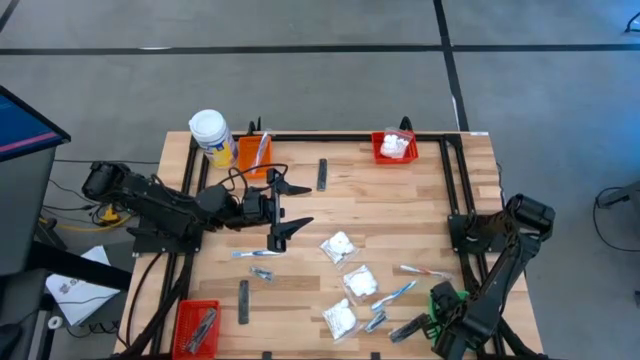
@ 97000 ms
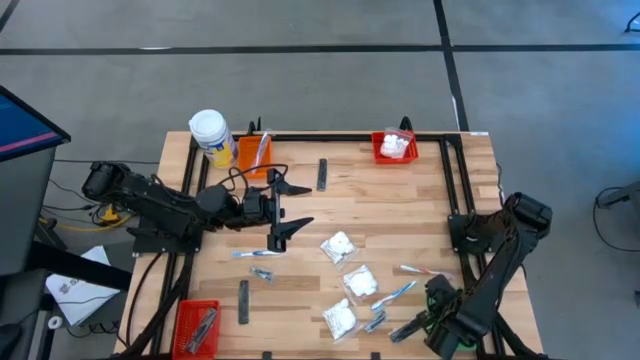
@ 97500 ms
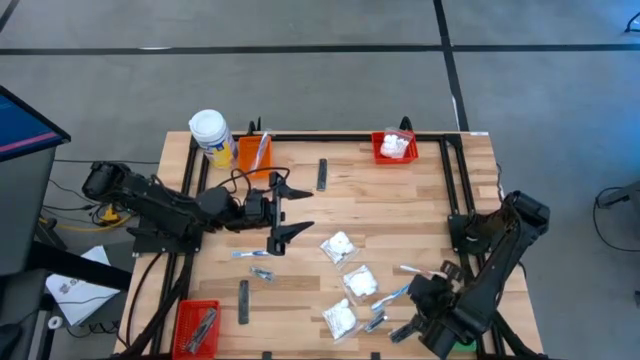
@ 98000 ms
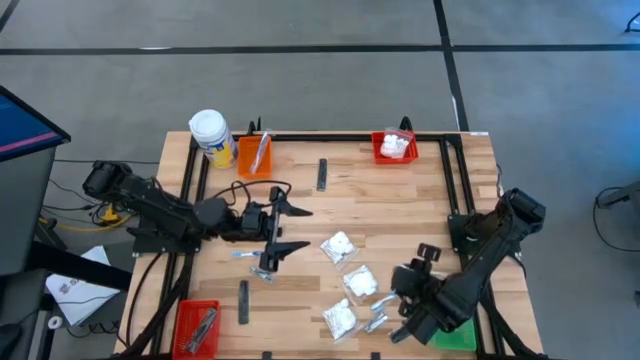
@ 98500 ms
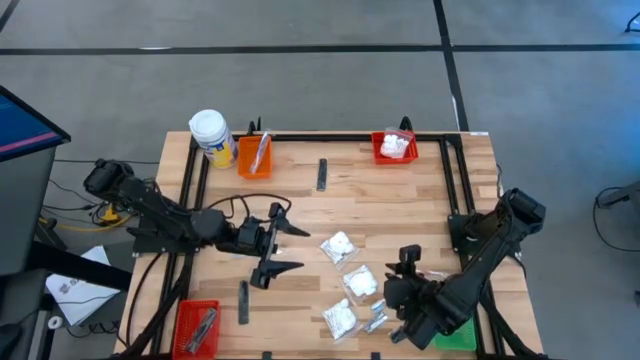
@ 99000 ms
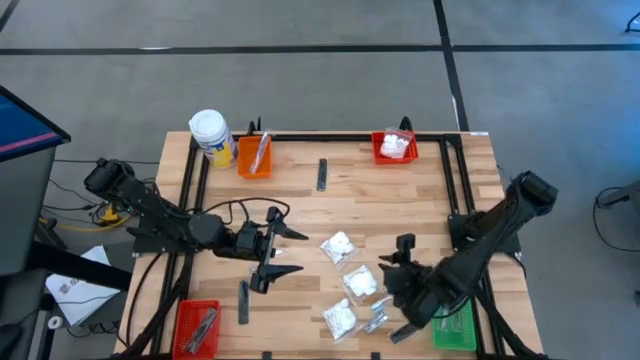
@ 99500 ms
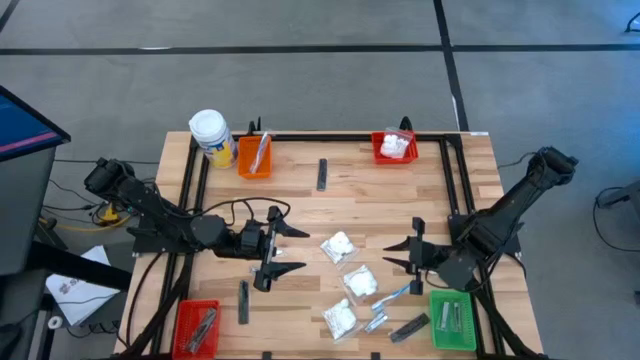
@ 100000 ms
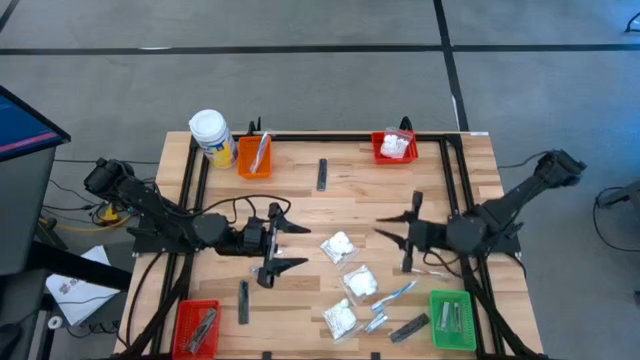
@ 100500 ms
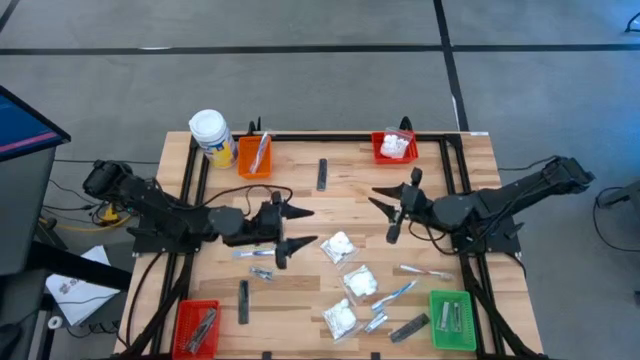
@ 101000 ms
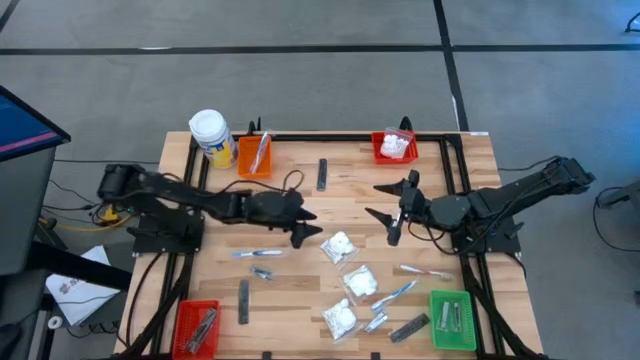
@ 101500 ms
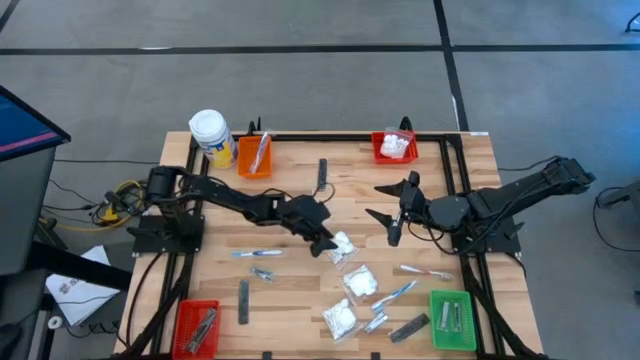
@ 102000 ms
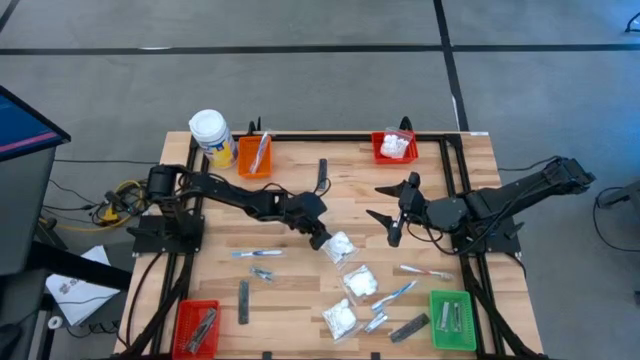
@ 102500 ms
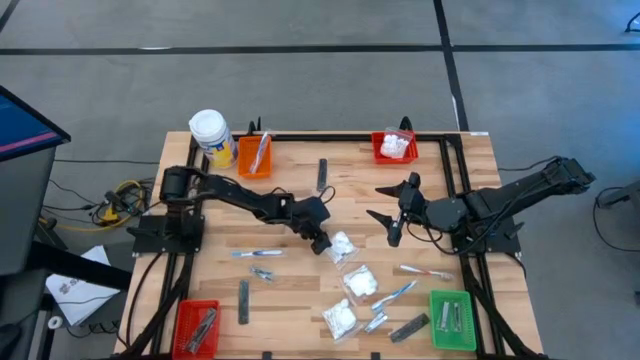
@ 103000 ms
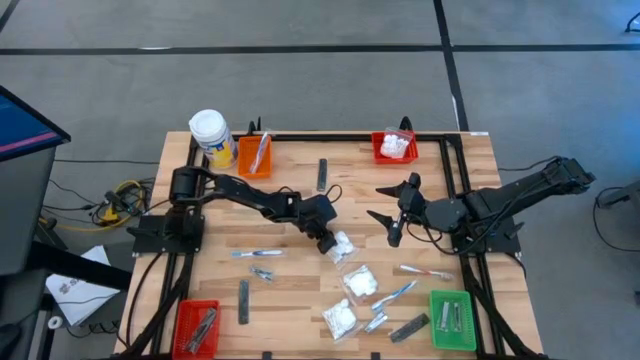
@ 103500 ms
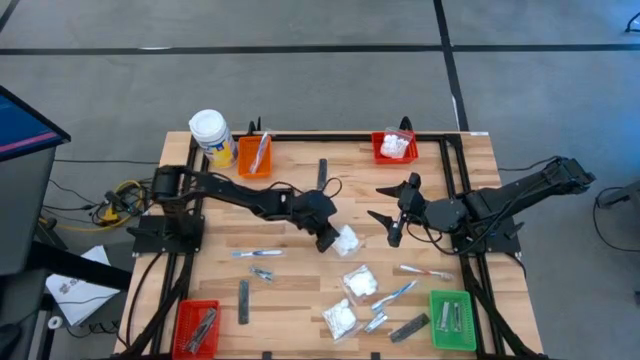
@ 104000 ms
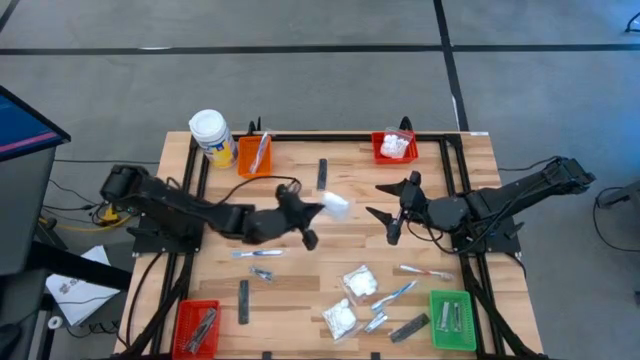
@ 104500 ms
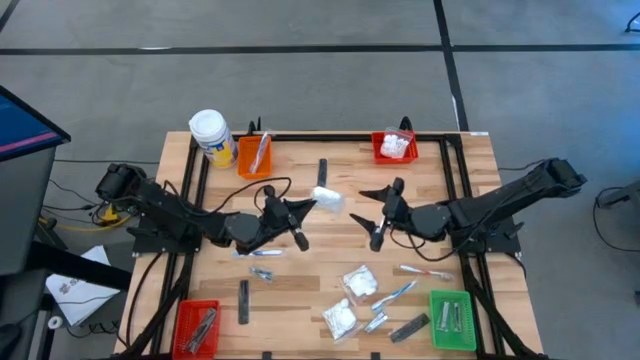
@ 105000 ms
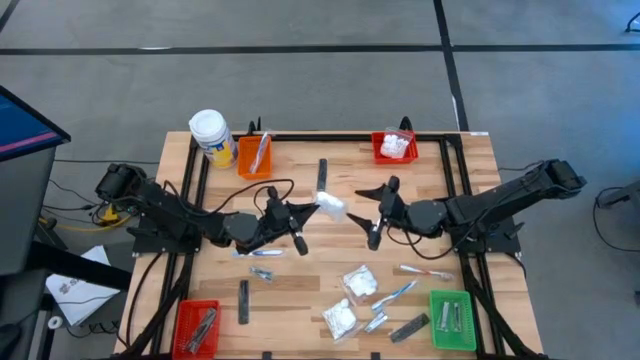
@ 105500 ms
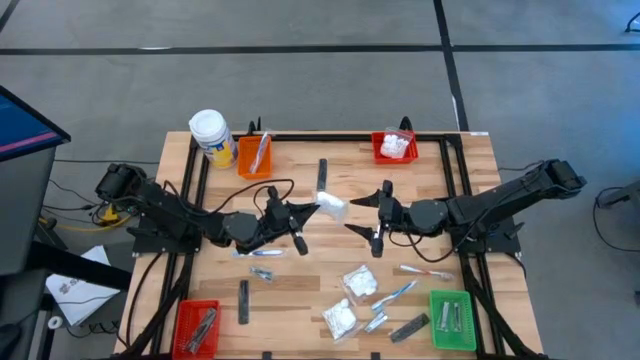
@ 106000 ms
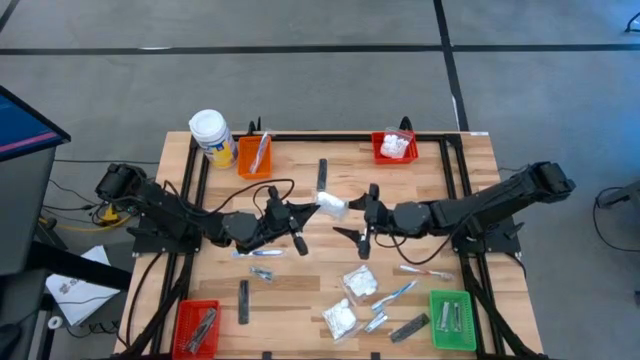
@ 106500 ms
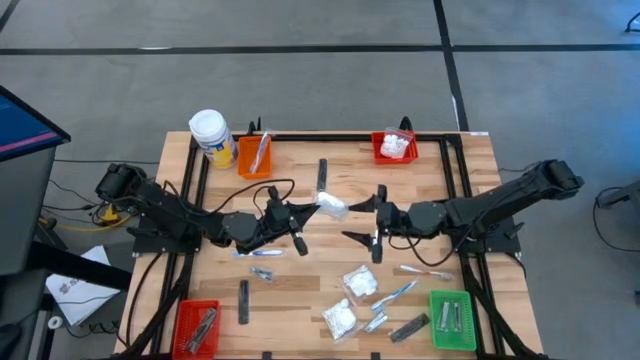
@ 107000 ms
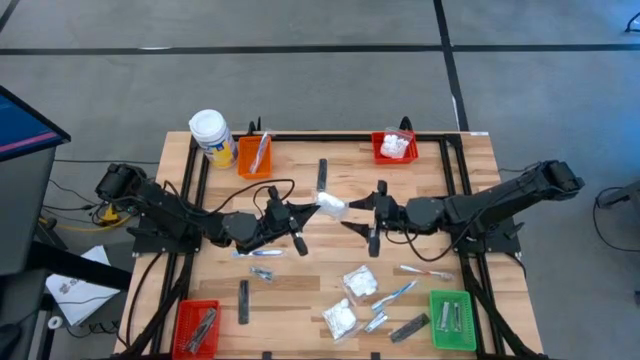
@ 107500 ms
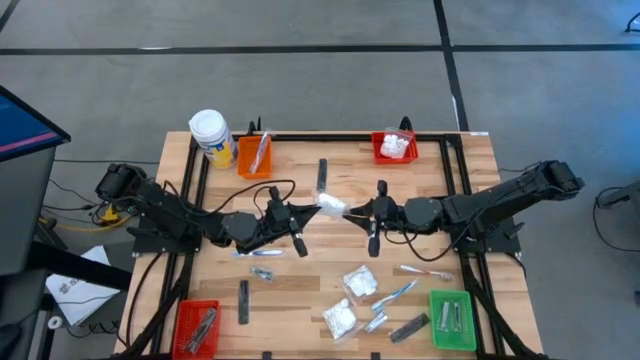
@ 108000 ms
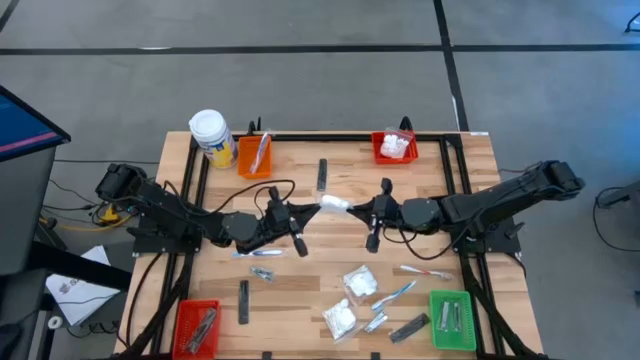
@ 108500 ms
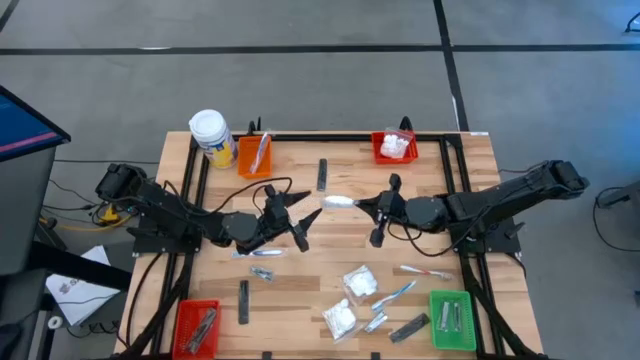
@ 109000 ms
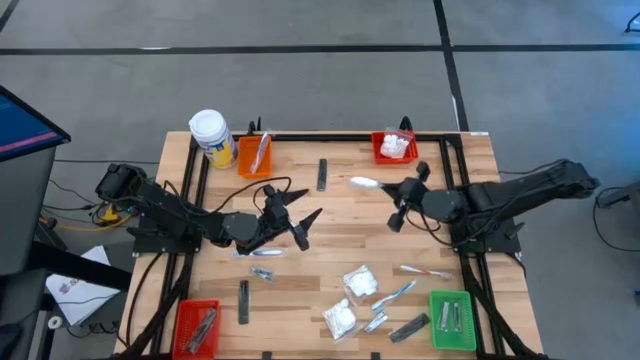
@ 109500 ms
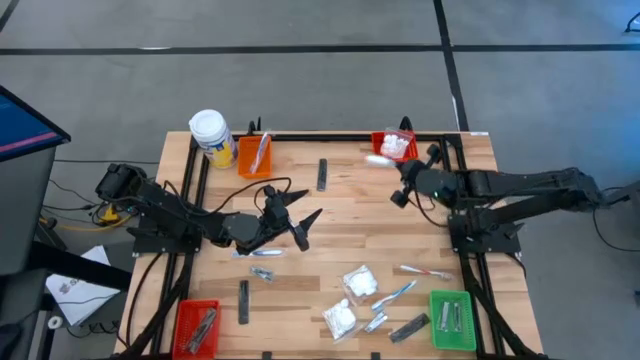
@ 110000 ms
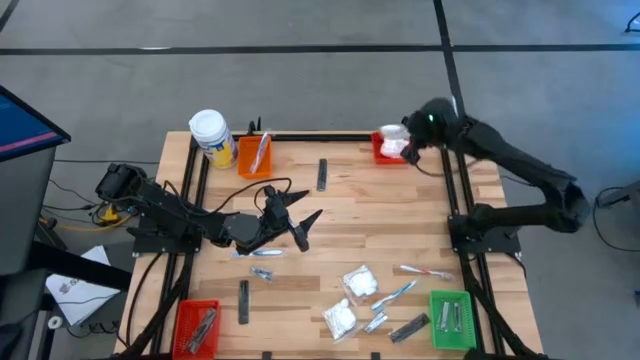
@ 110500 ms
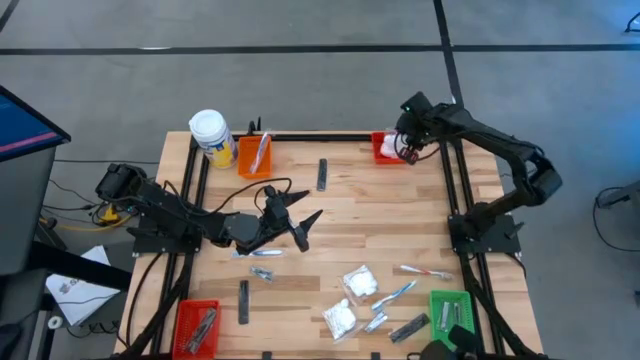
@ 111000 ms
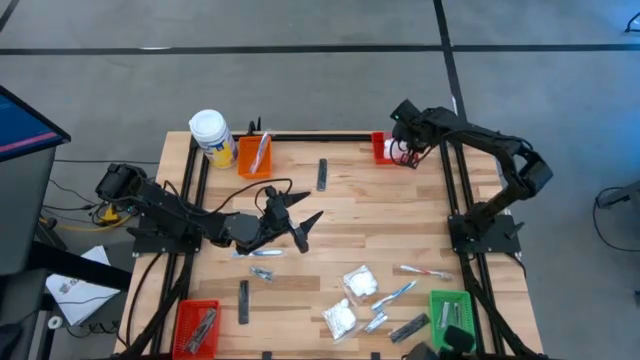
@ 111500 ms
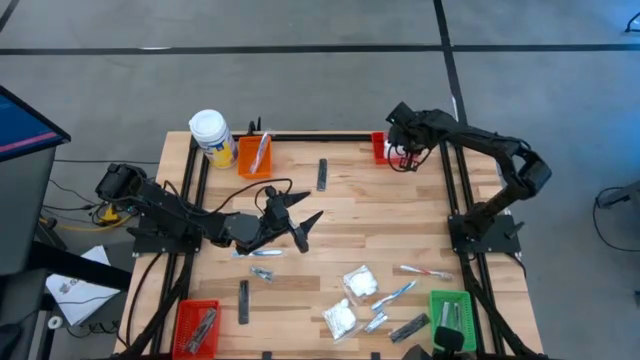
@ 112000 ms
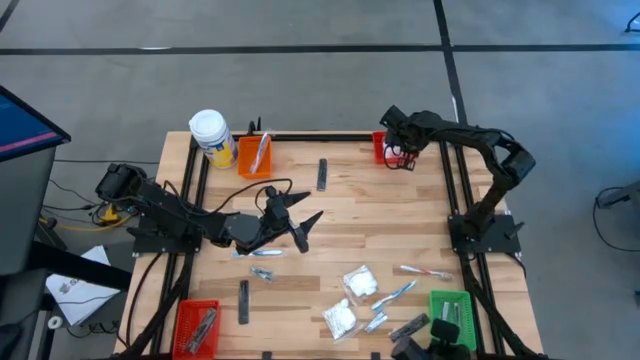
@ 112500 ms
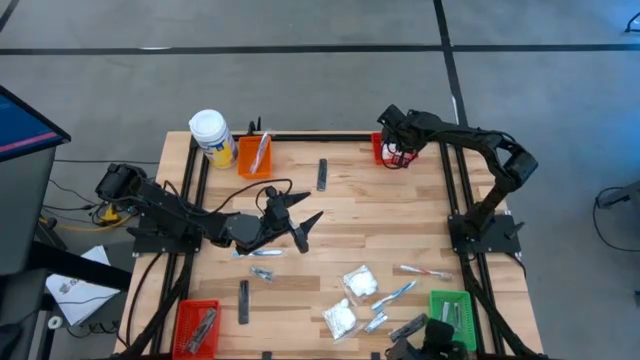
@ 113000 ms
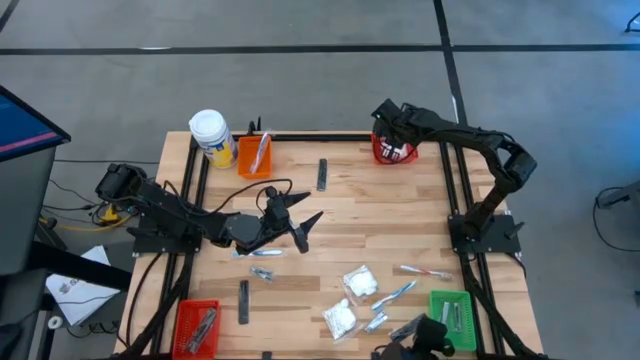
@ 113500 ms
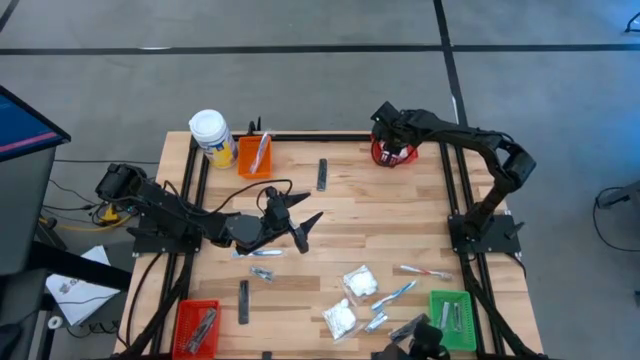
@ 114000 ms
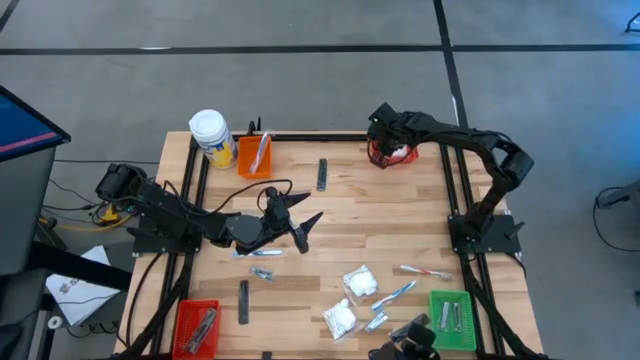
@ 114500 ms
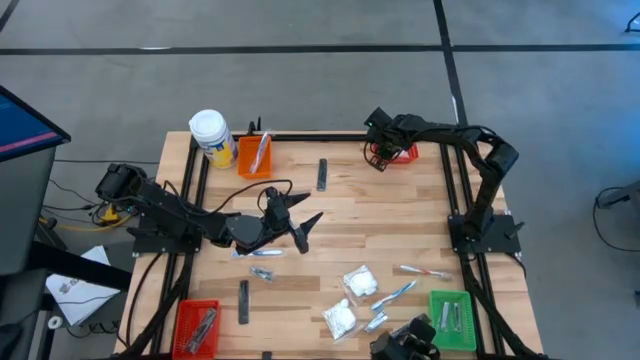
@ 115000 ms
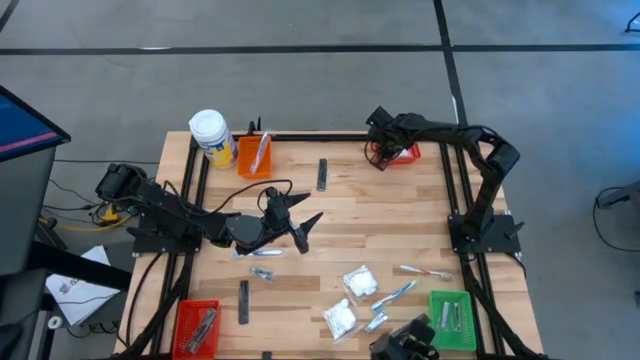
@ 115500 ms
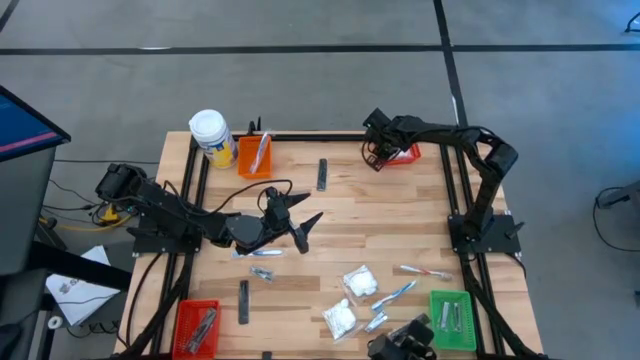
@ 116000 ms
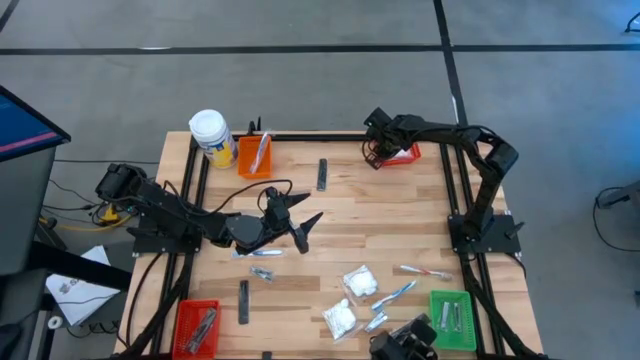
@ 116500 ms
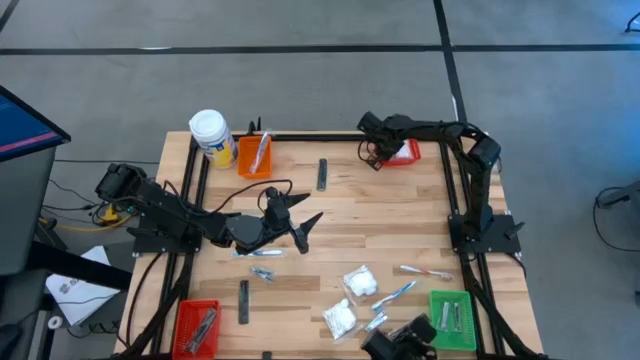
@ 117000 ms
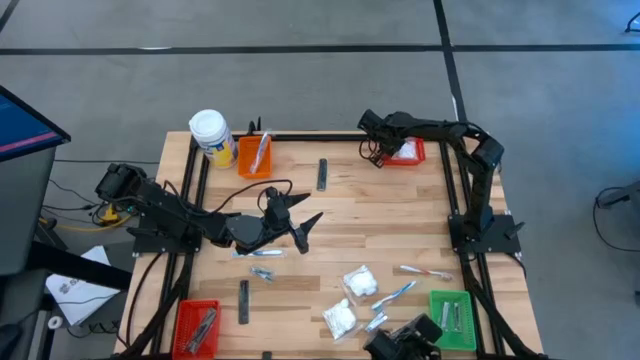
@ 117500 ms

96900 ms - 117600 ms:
Task: Pick & Place Travel size toiletries
Stack the top cotton pack on top of the cotton pack in the red bin

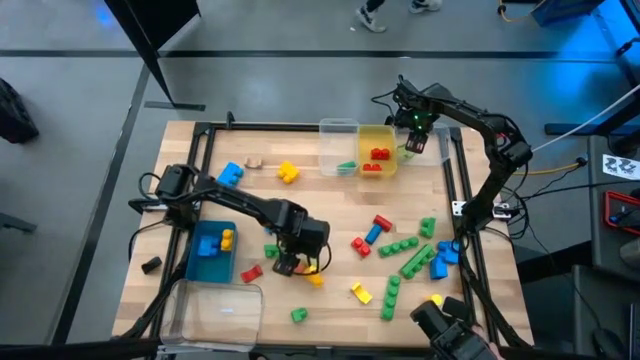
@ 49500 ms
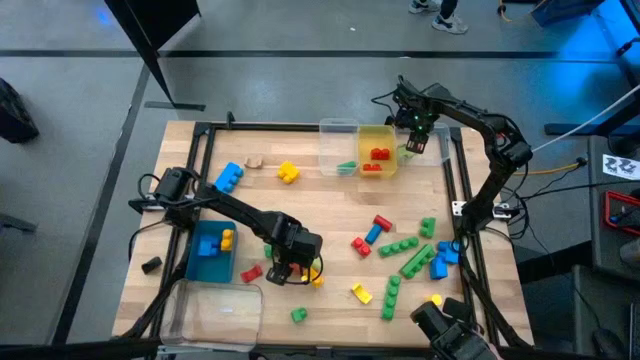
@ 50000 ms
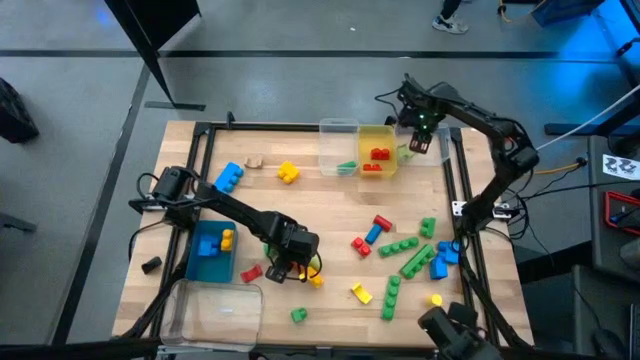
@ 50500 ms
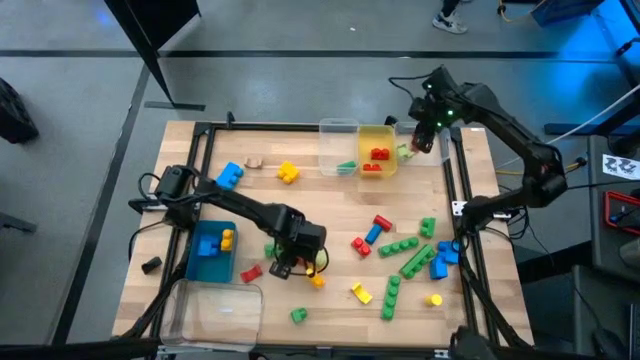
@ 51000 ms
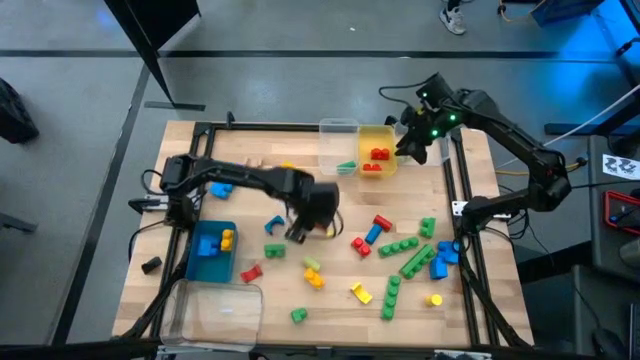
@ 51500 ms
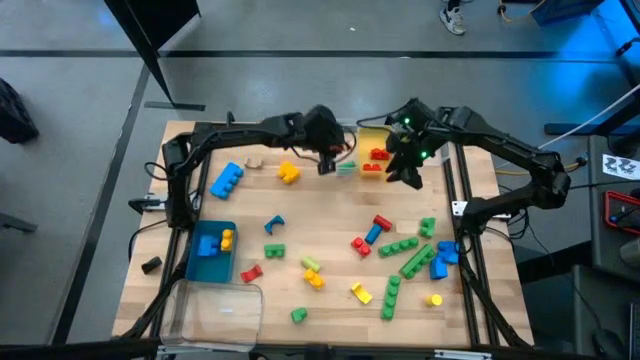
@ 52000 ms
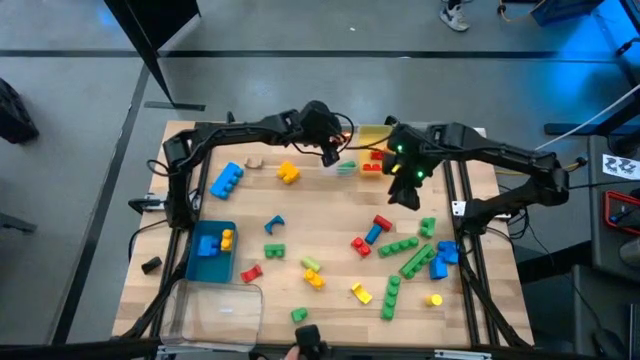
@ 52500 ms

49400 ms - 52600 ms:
Task: Sort blocks by size
Put the orange cylindrical block into the top left transparent bin
